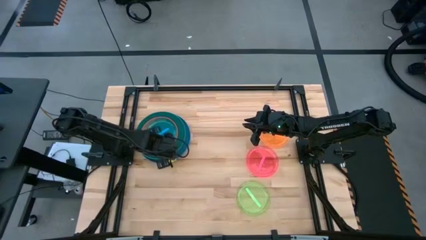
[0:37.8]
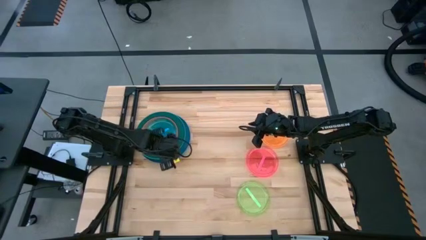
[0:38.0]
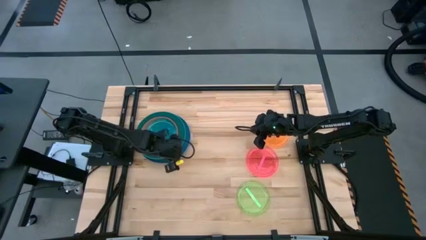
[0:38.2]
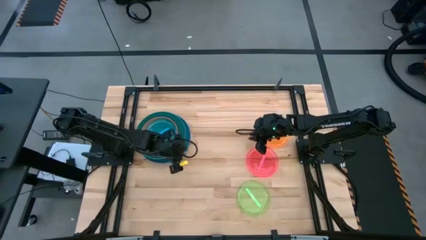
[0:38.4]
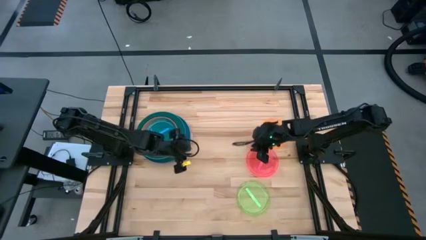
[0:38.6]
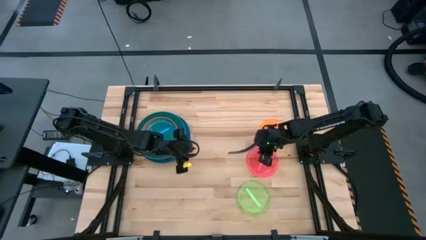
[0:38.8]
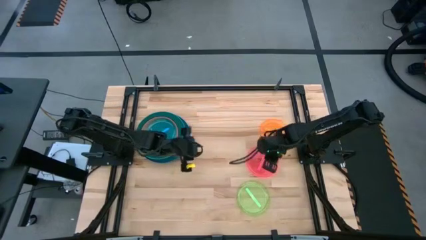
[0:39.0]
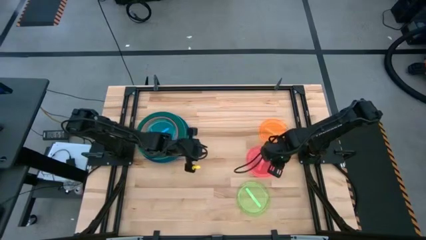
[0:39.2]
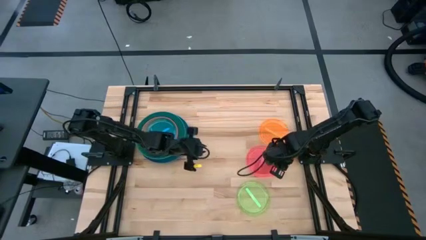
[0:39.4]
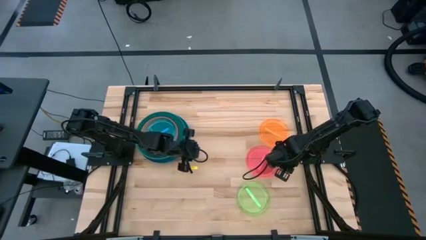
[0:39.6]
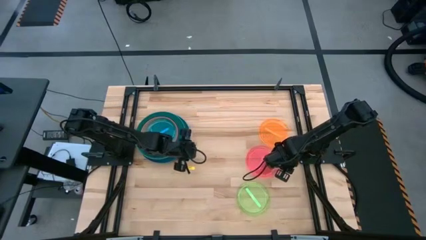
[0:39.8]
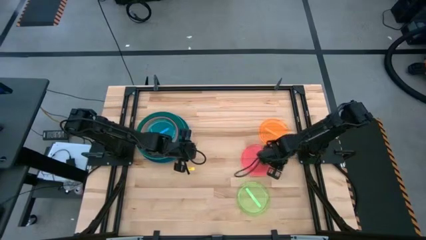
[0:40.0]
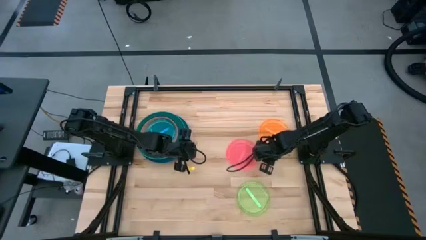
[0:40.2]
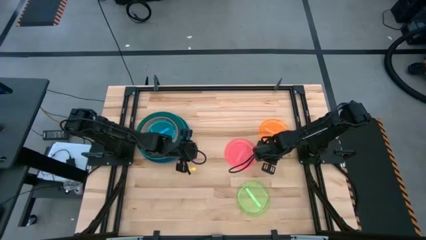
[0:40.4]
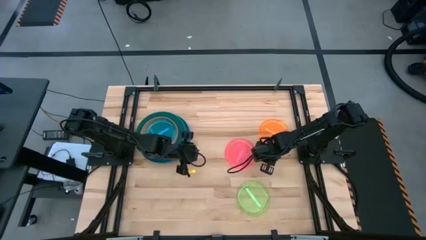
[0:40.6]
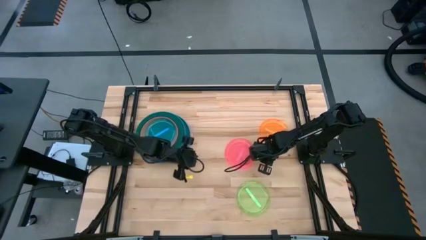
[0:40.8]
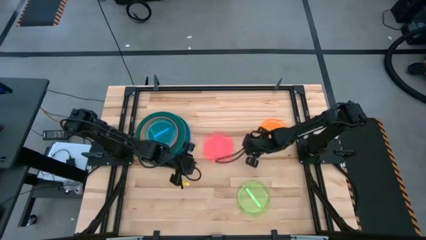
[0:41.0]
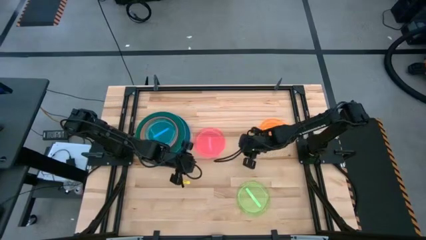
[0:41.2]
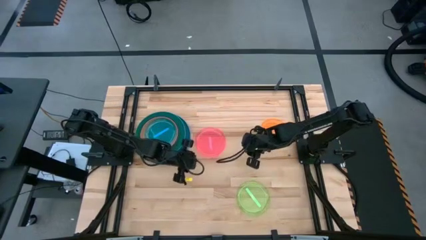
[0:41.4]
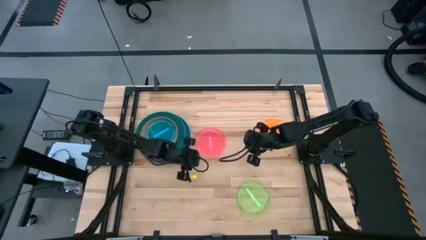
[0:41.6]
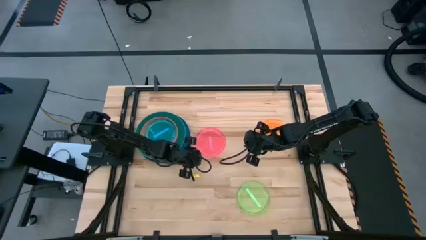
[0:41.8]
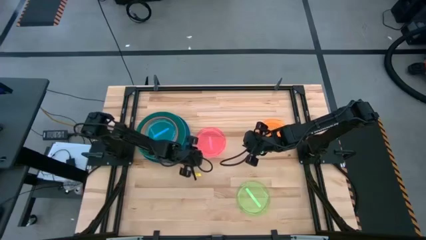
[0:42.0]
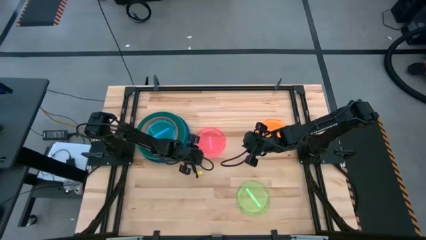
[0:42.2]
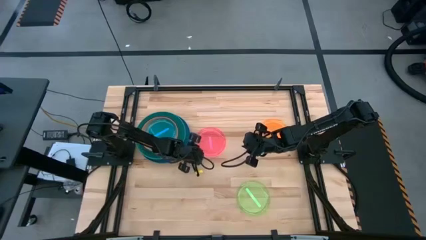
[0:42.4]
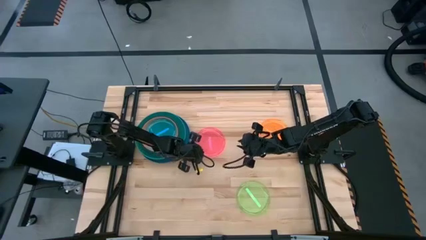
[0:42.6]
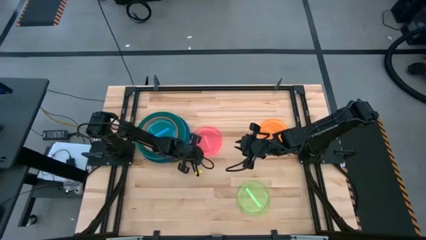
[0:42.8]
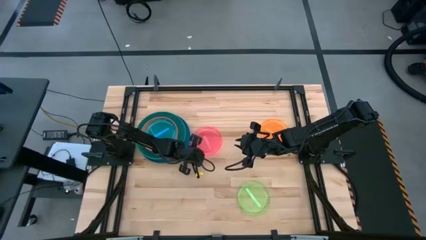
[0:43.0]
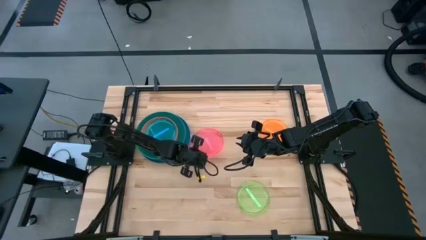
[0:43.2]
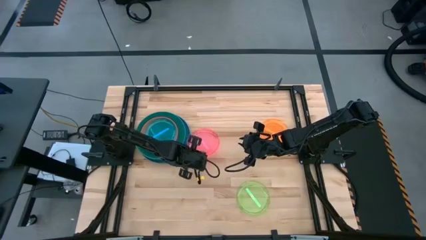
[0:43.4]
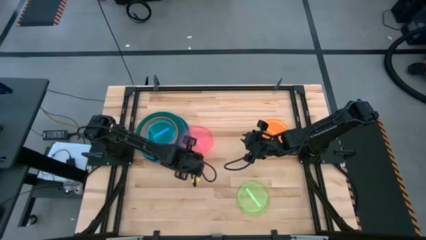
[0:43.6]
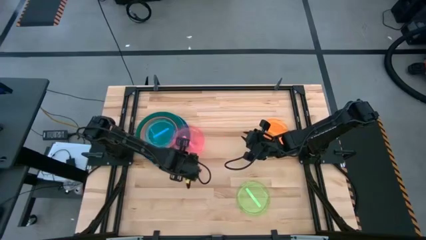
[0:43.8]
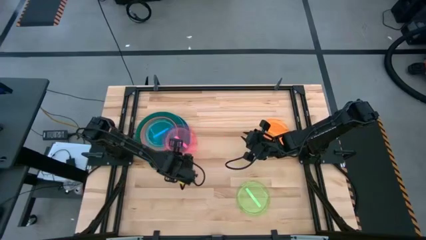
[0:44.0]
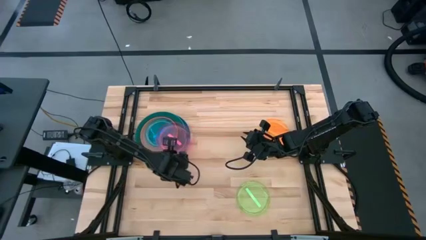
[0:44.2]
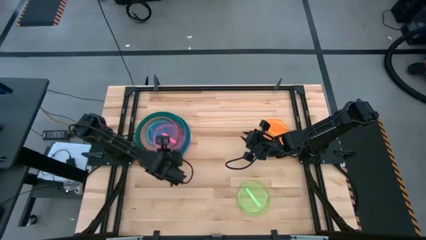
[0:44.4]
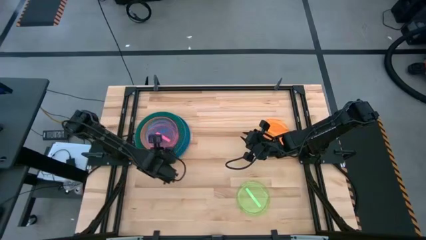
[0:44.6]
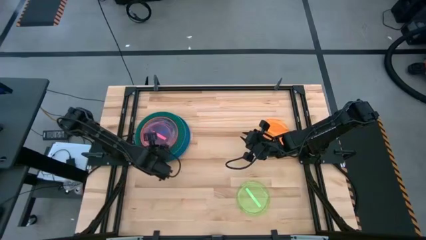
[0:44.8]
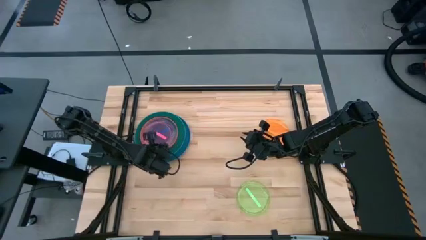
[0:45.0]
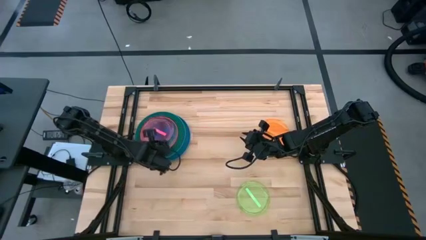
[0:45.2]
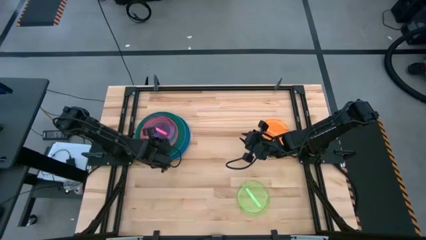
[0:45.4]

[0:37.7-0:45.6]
Task: Stack plastic plates
Stack the pink plate on top of the light blue plate

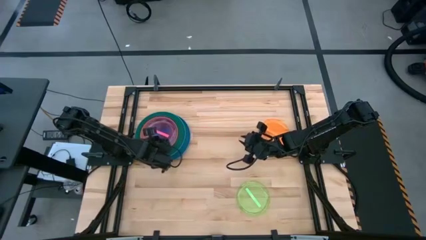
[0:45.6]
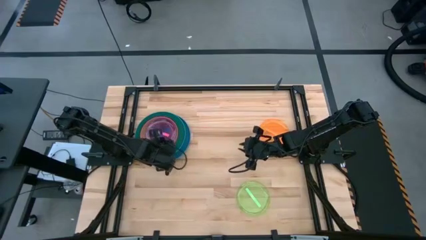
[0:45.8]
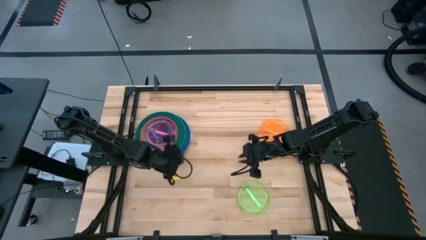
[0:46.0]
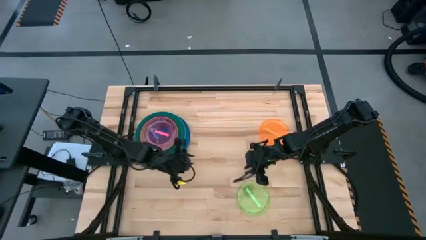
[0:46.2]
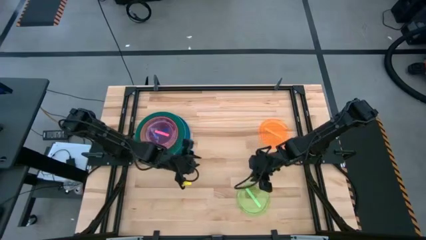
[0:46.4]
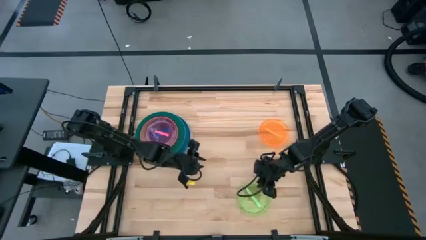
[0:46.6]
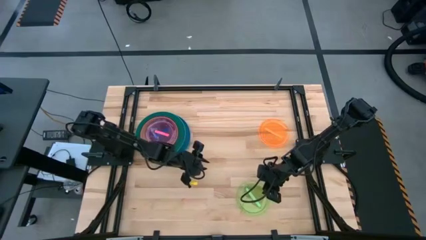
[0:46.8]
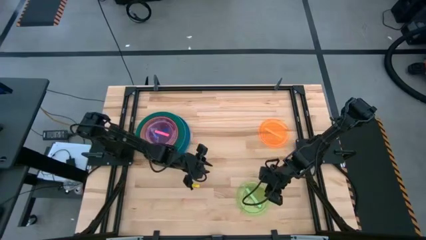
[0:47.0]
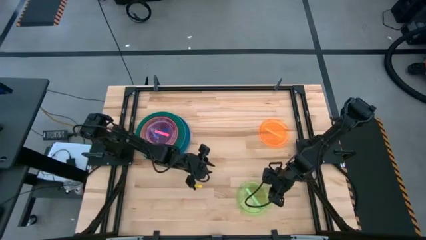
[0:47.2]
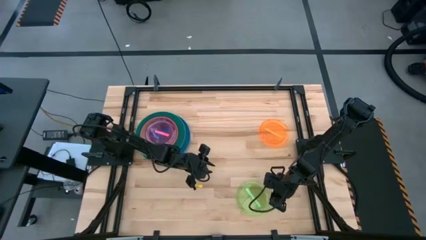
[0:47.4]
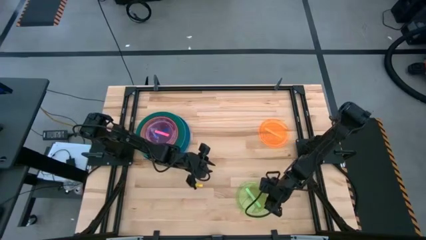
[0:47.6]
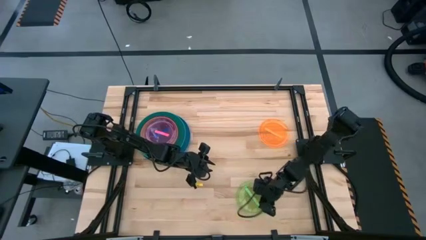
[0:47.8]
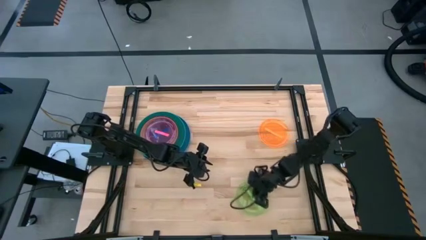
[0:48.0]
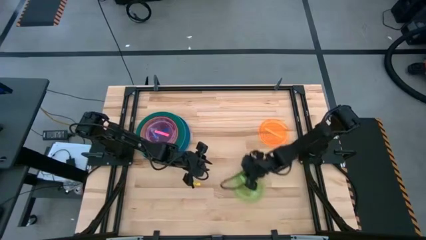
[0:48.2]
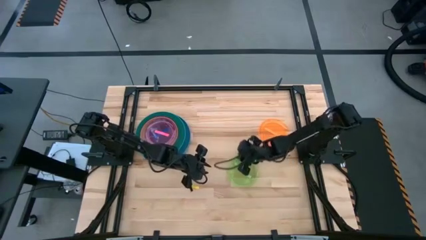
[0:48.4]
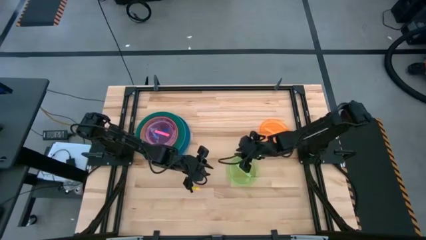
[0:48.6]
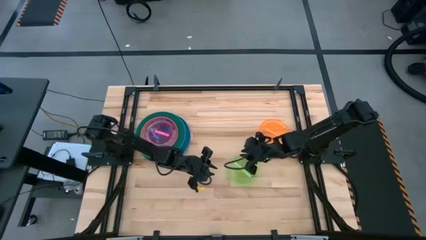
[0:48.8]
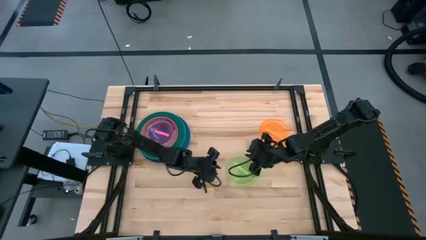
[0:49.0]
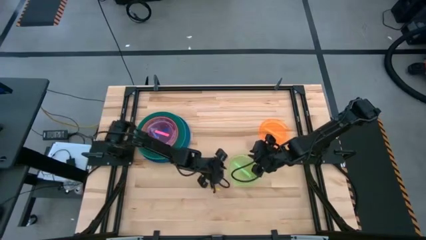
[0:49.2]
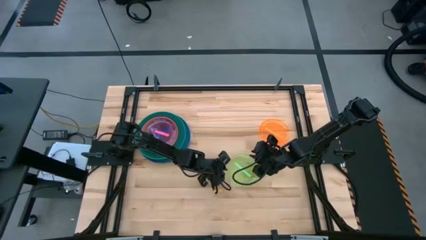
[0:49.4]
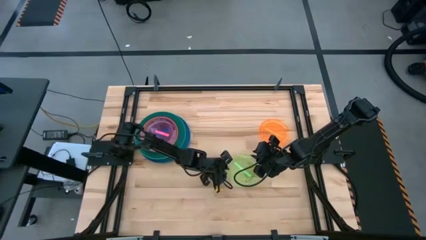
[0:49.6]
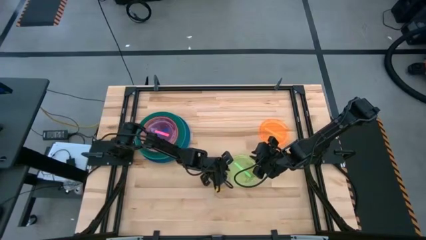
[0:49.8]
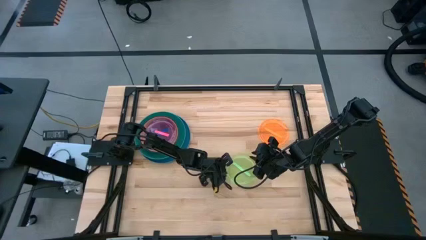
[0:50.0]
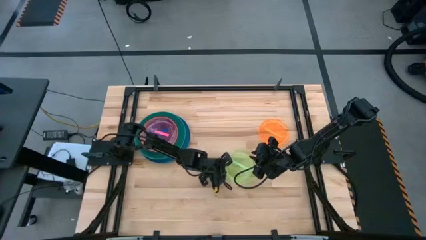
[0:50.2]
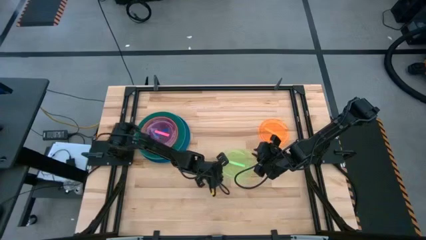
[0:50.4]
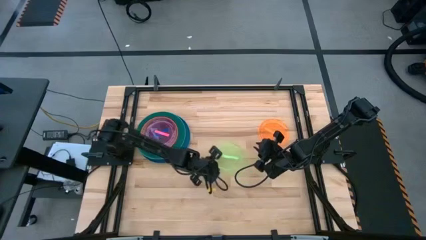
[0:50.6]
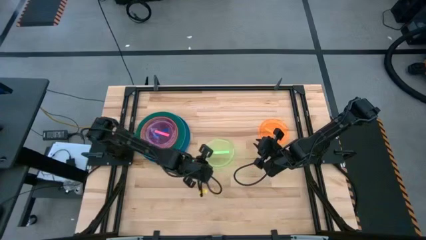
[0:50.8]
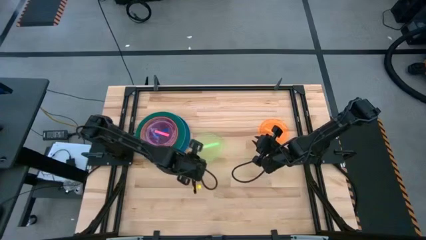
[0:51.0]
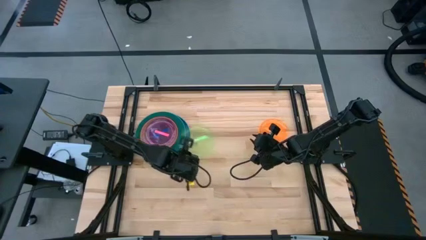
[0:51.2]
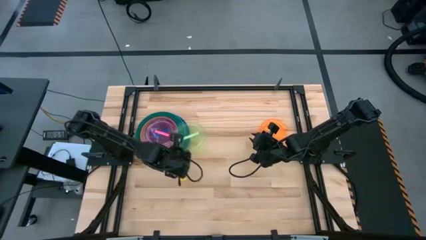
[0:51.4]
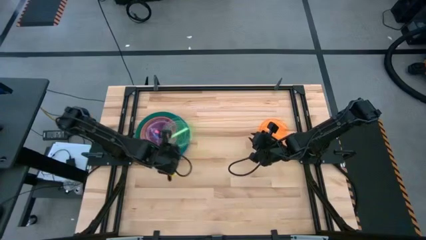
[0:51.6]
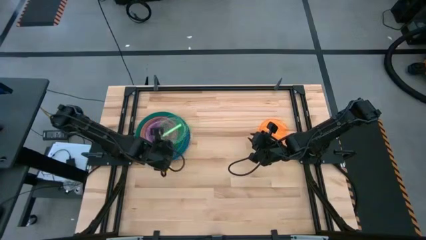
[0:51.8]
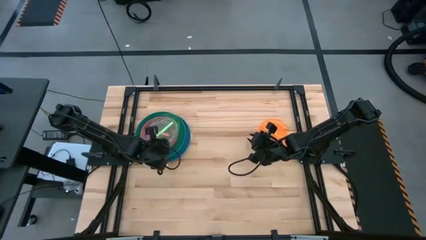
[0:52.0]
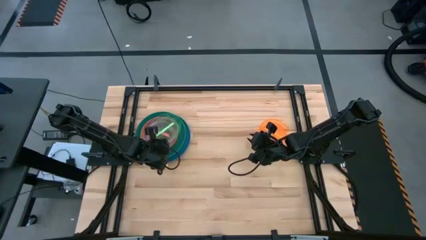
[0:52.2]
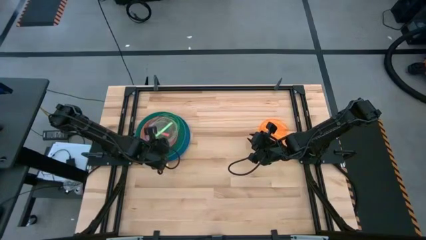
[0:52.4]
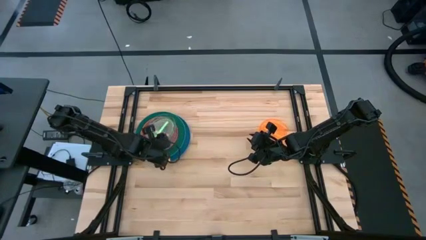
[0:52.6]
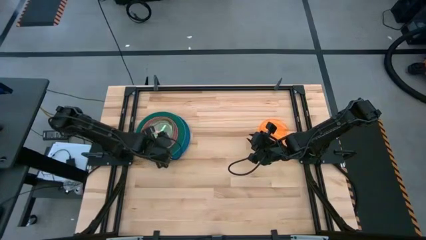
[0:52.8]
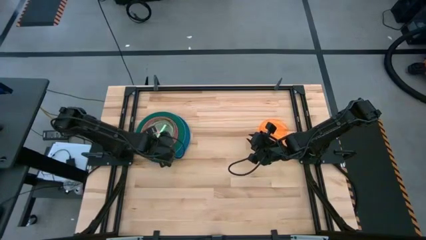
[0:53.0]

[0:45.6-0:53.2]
Stack the light green plate on top of the pink plate

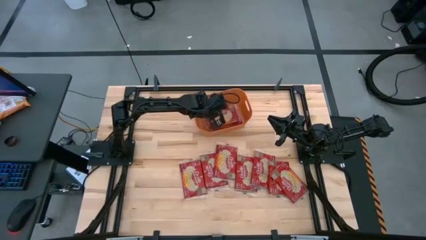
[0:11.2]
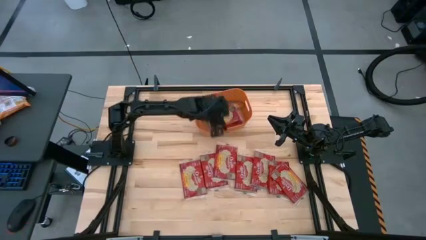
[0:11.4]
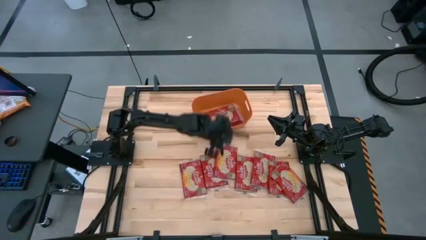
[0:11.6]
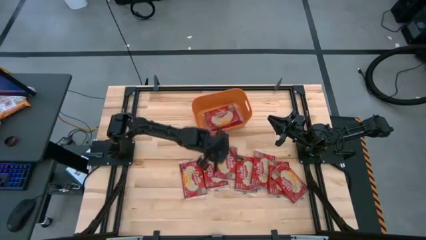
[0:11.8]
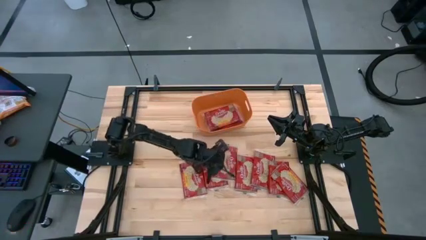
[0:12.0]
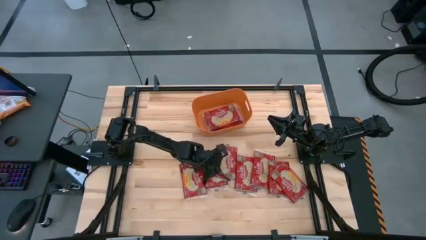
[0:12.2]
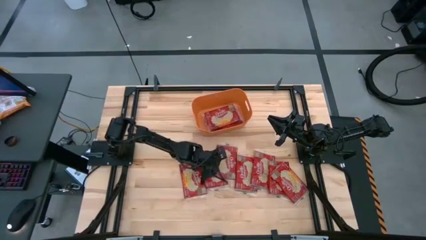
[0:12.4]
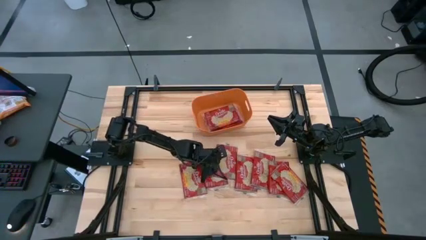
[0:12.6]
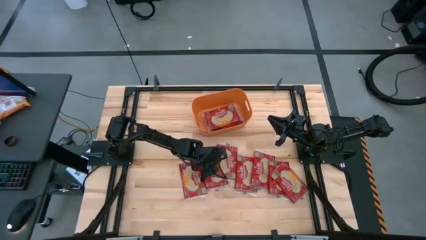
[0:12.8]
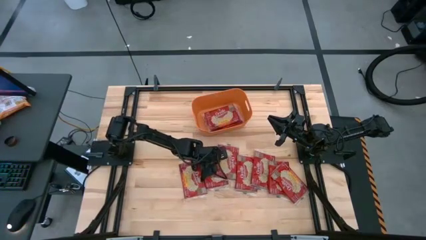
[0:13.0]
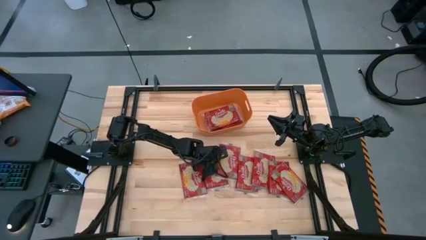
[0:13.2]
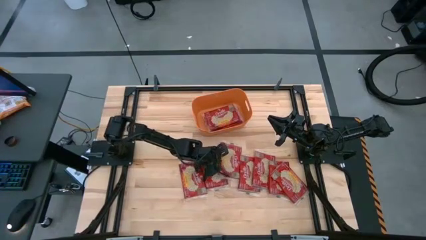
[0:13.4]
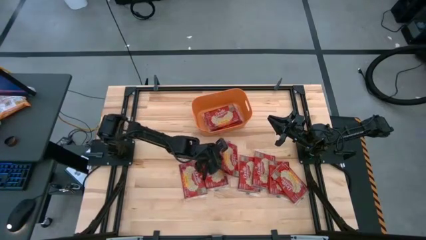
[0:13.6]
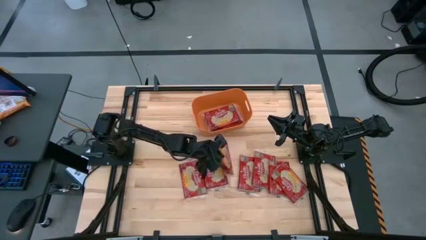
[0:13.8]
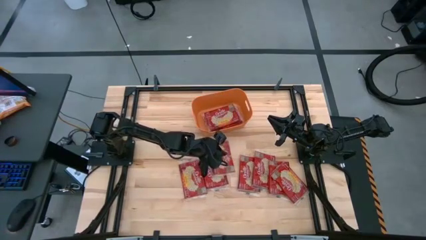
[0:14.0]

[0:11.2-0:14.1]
Task: Sort popcorn bags into baskets
Put the red popcorn bag into the orange bin
